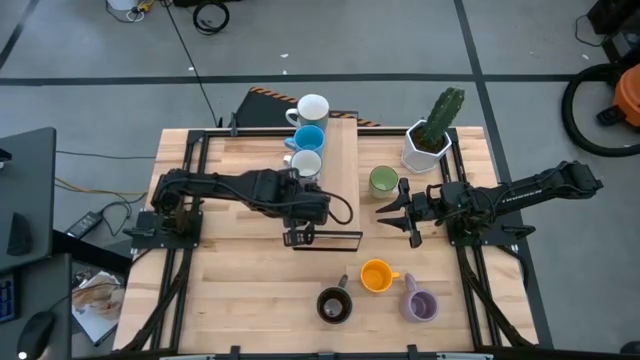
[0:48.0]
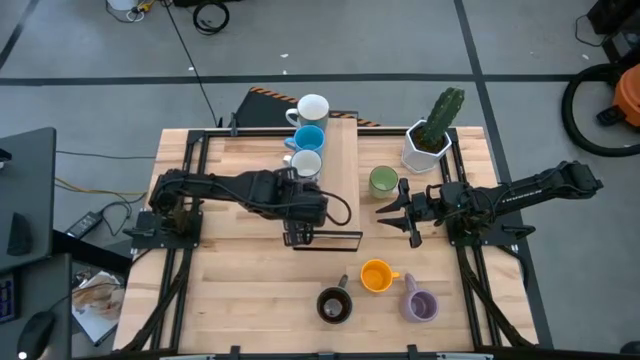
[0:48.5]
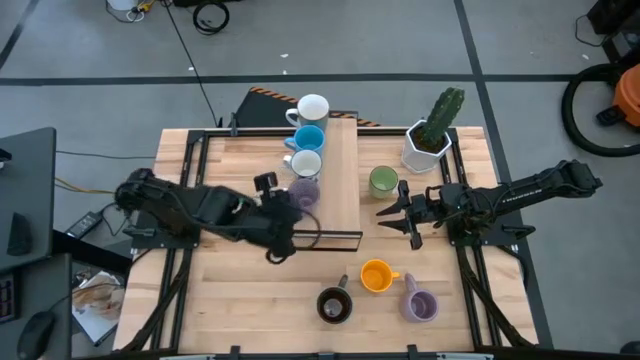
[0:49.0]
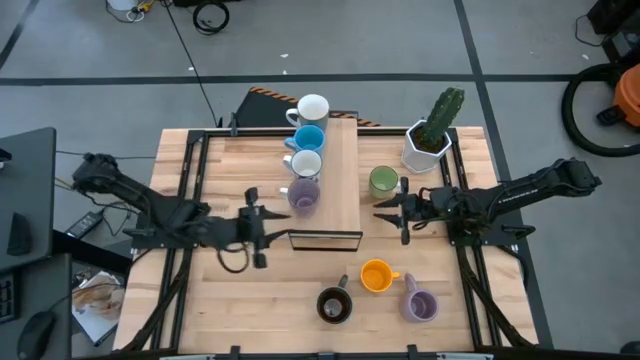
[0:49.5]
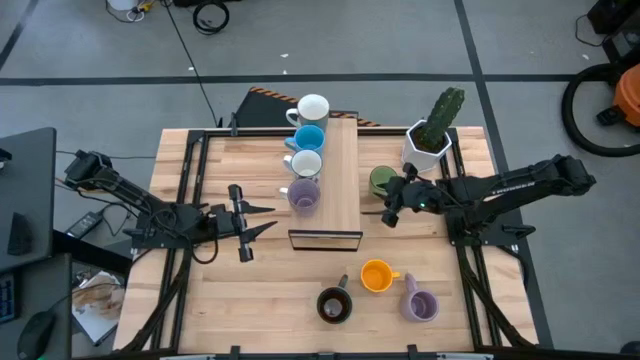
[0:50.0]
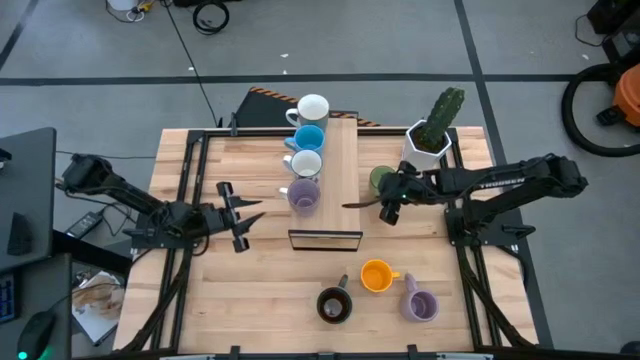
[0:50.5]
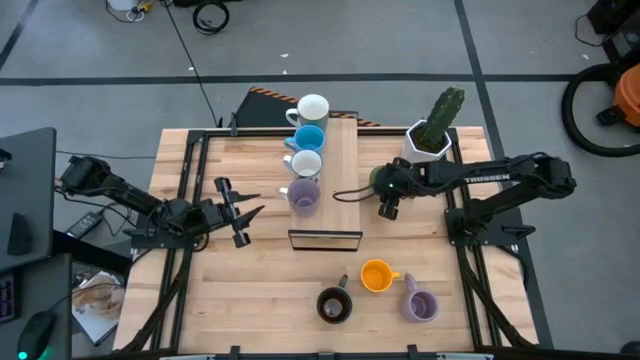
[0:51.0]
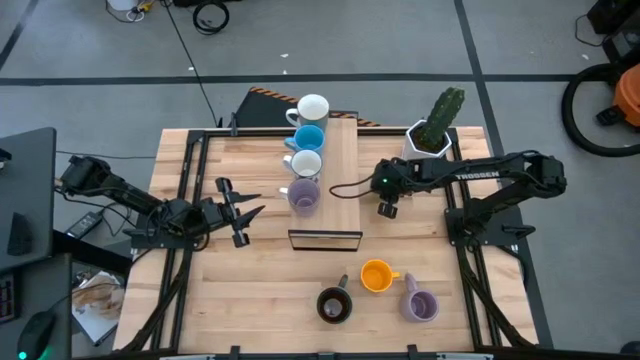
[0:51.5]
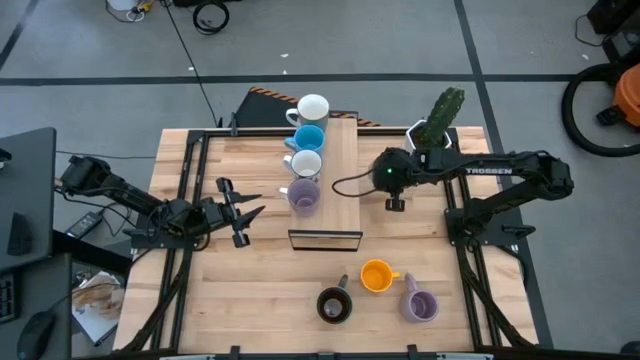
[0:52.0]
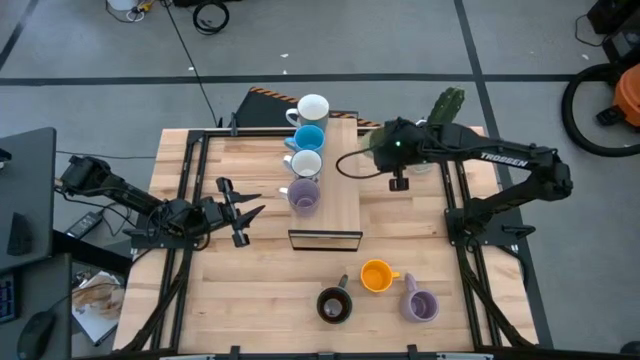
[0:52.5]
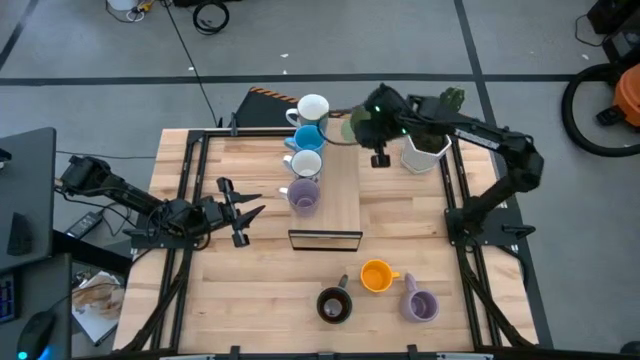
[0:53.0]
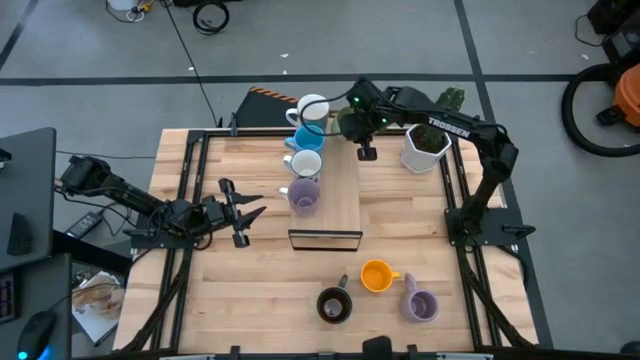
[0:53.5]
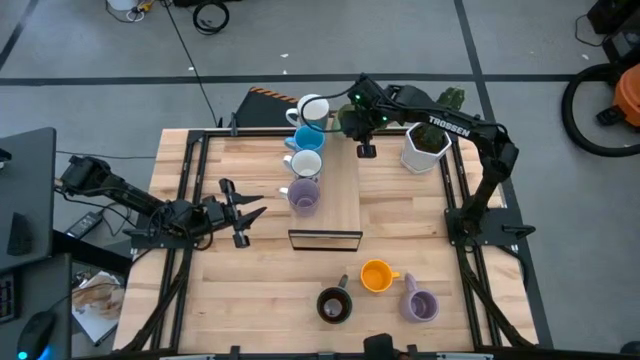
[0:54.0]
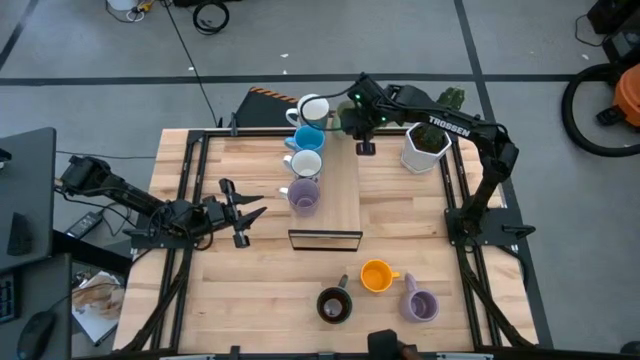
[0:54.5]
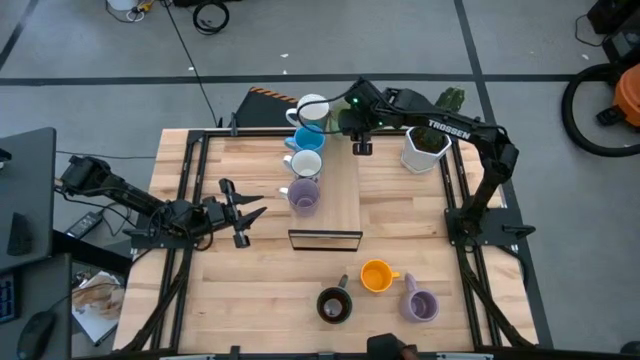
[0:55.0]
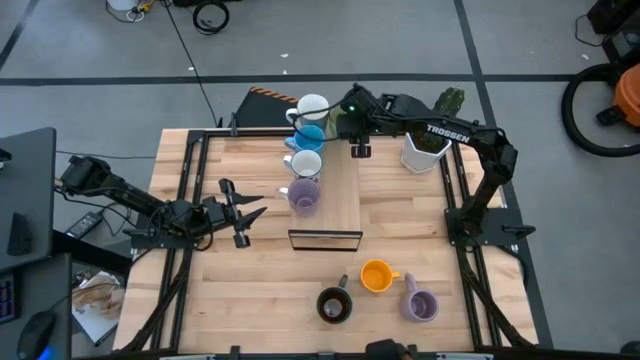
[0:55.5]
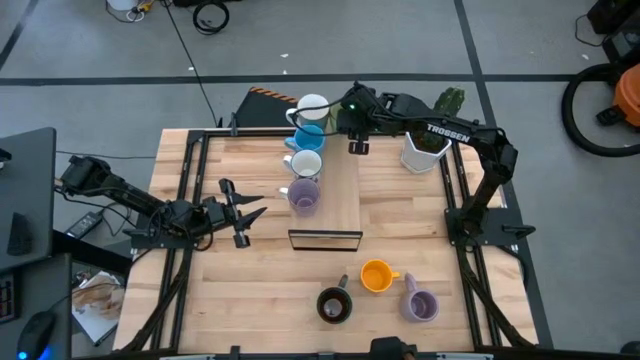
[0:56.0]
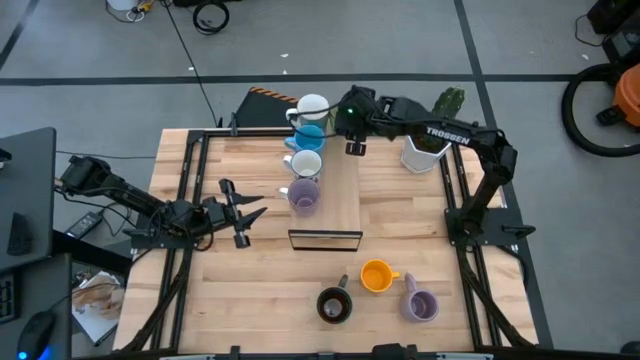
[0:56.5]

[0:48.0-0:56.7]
Task: Place coffee mugs
Put the green patterned mug on the shelf

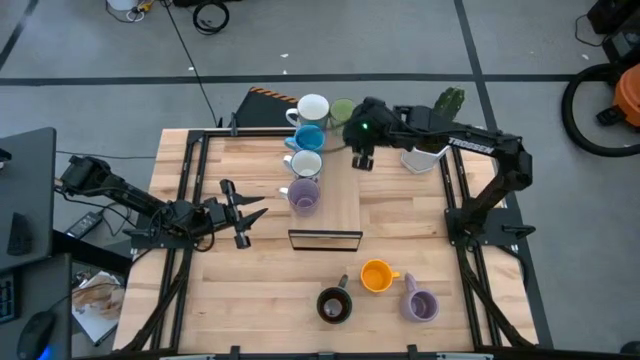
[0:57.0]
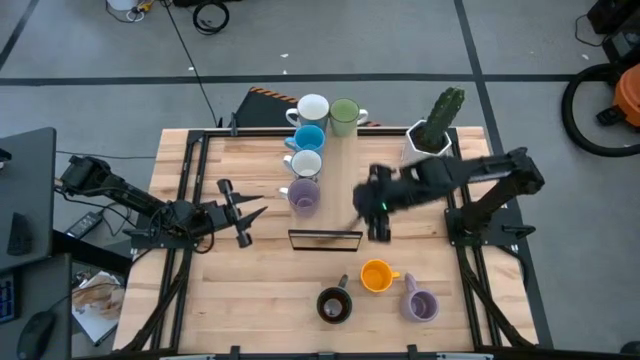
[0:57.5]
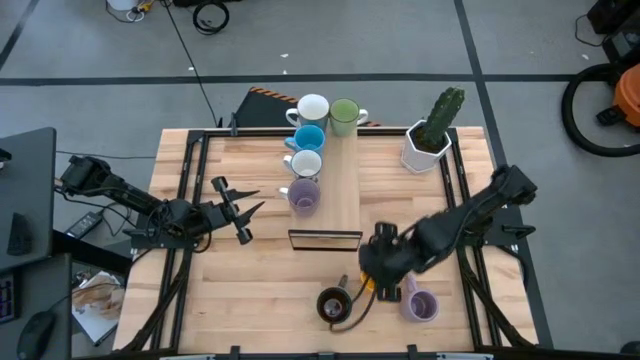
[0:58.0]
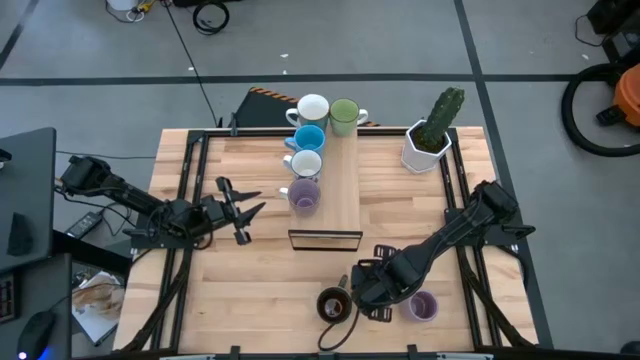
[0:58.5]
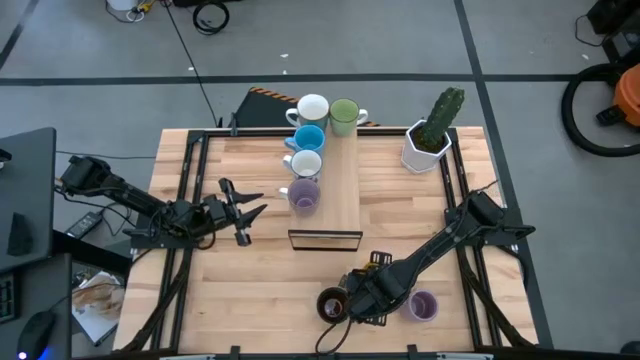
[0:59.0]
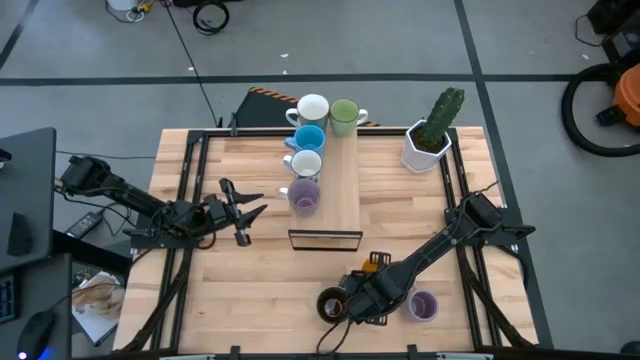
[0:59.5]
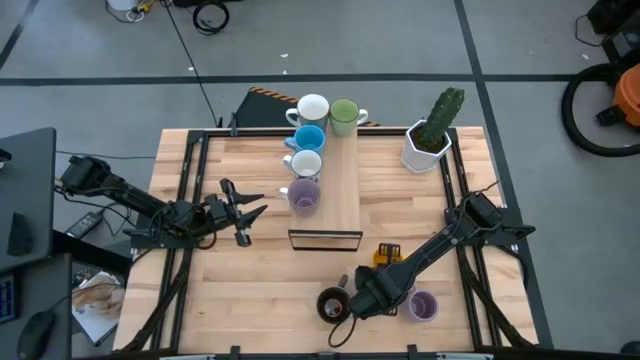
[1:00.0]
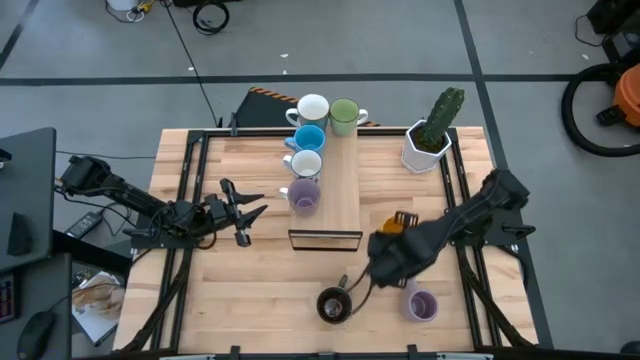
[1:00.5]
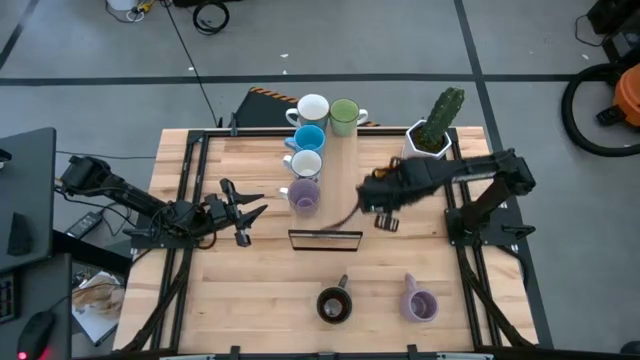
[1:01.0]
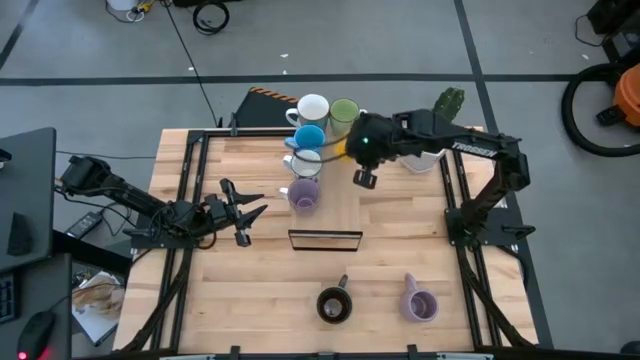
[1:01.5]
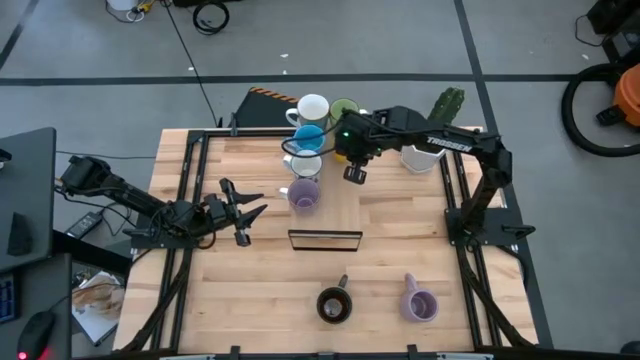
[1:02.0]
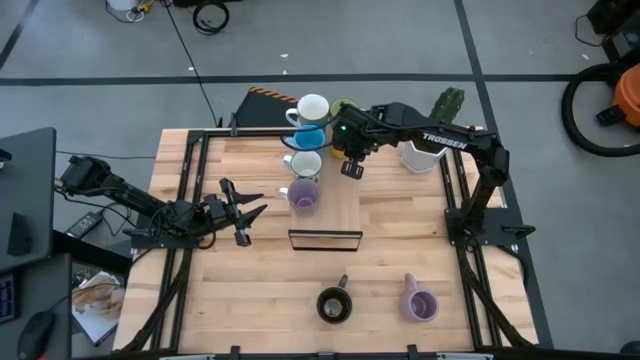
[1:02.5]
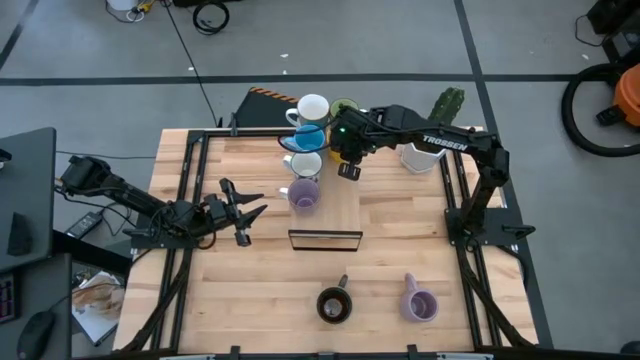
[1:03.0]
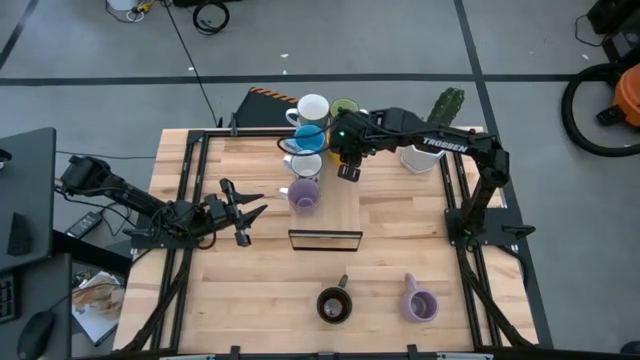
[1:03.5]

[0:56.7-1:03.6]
Put the yellow mug on the shelf

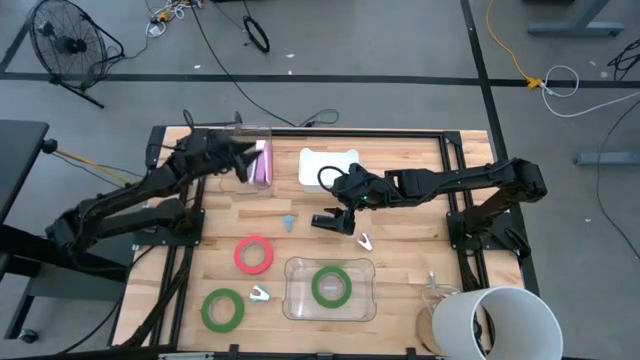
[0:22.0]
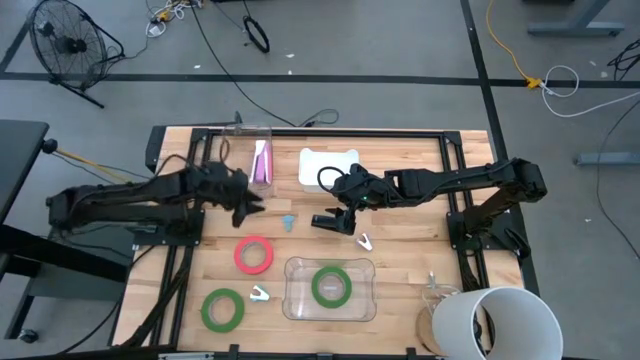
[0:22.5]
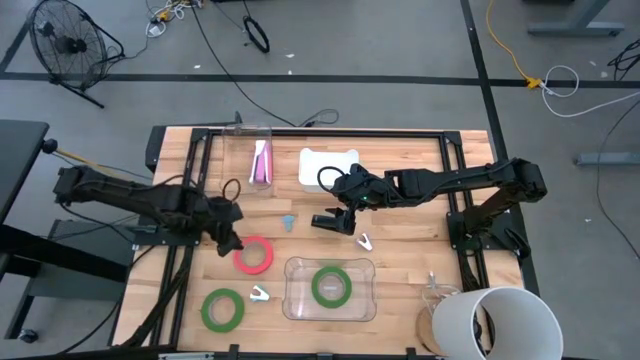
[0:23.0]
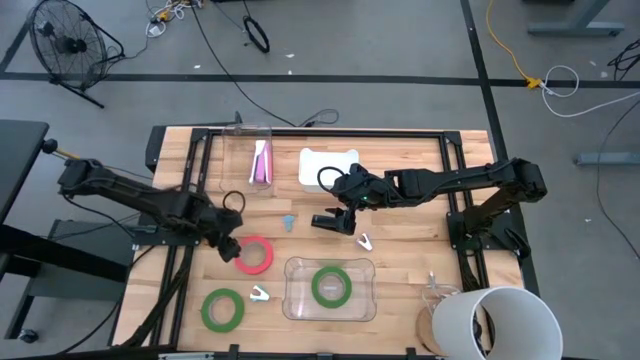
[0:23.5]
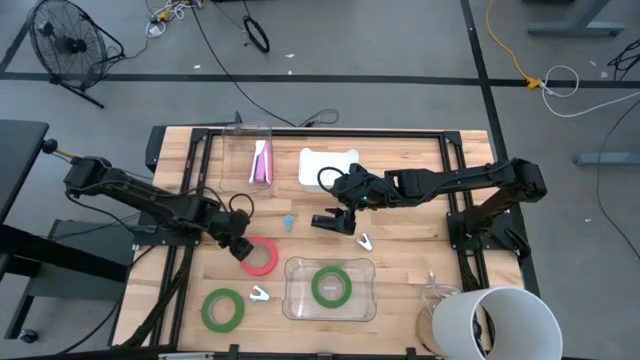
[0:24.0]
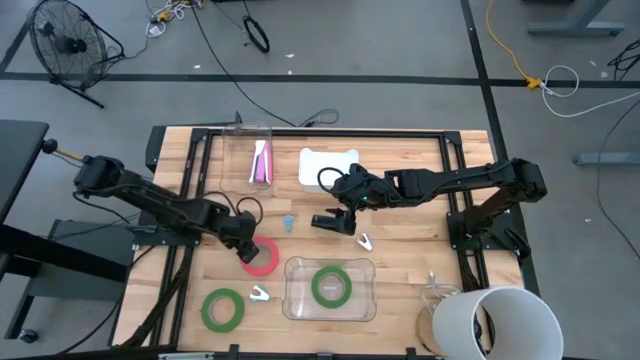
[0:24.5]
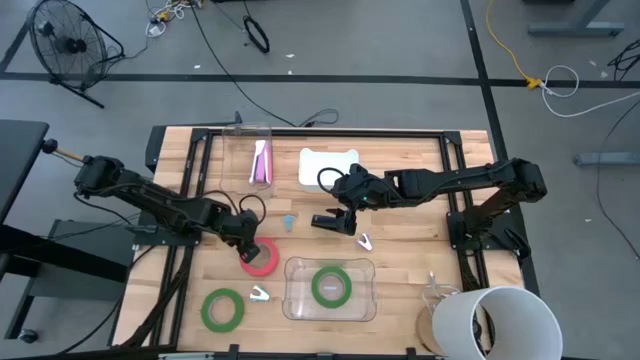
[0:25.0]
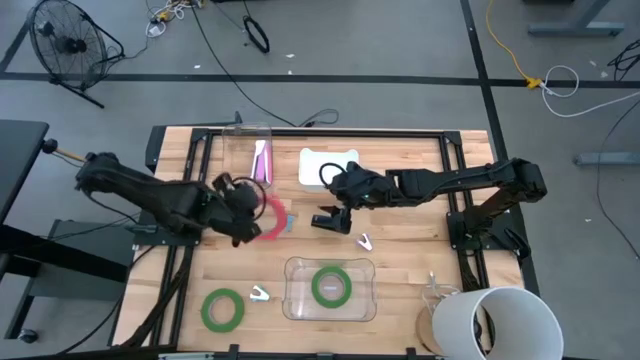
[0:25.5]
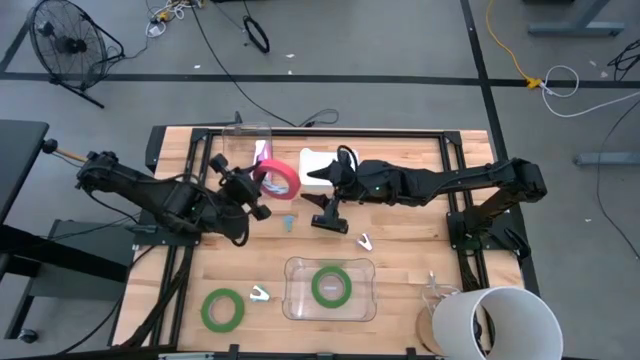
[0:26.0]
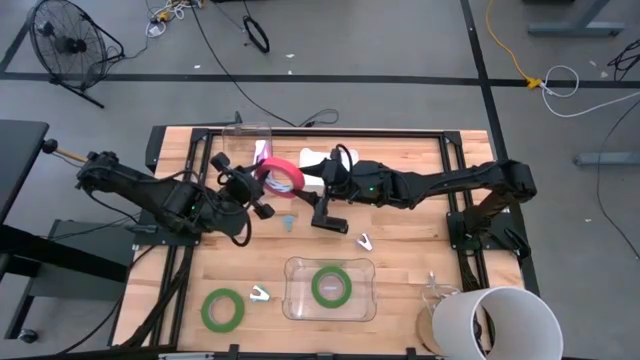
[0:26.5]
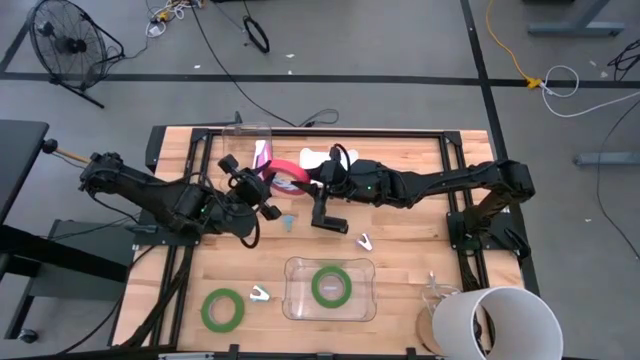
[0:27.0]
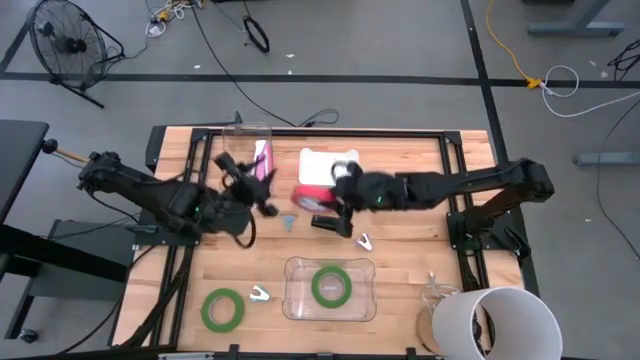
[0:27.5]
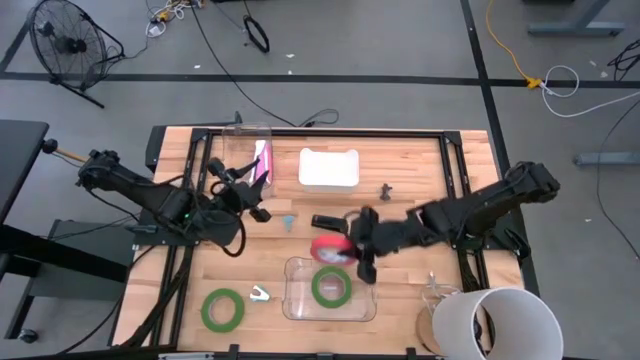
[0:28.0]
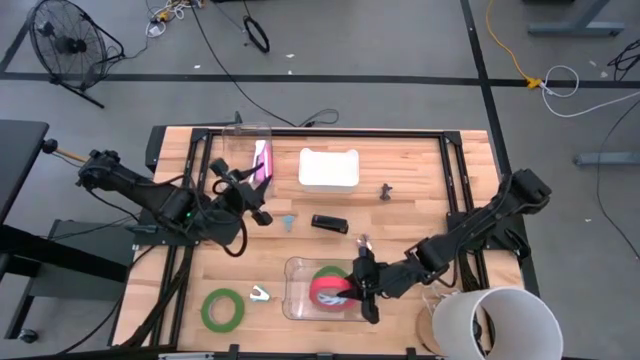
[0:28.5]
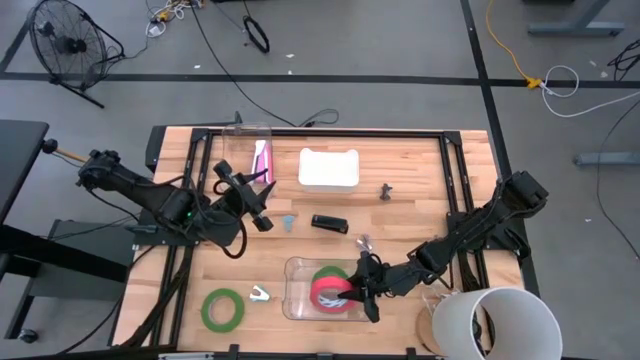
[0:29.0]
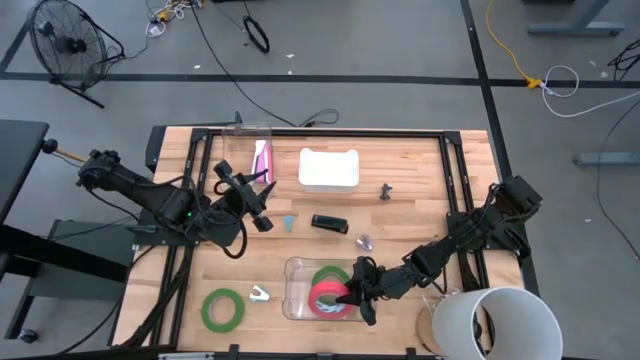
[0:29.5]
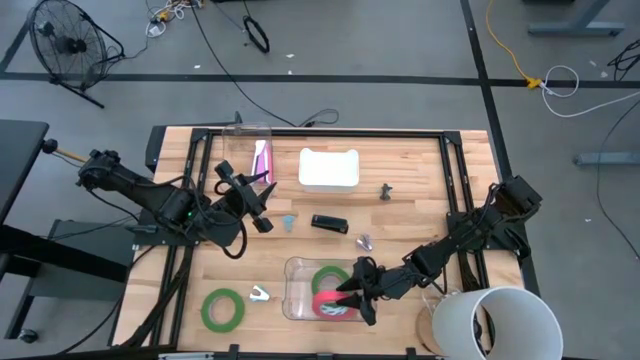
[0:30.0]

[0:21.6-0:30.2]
Task: Pick and place Stapler, Stapler remover, tape
Put the pink tape into the bottom transparent bin
